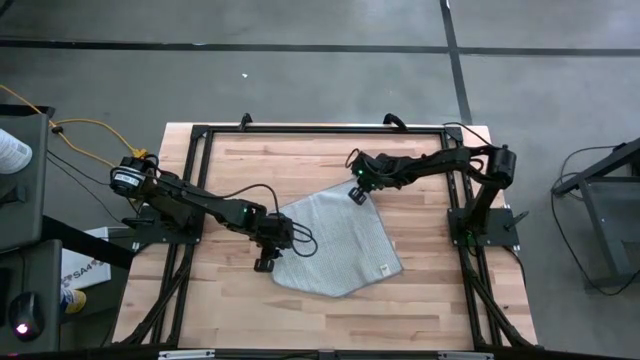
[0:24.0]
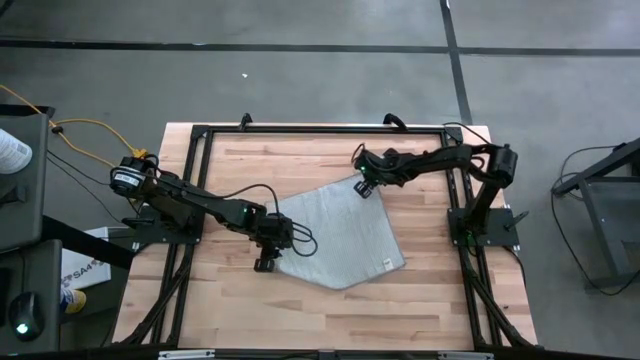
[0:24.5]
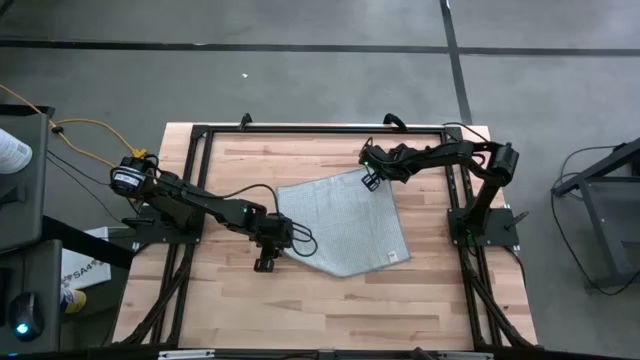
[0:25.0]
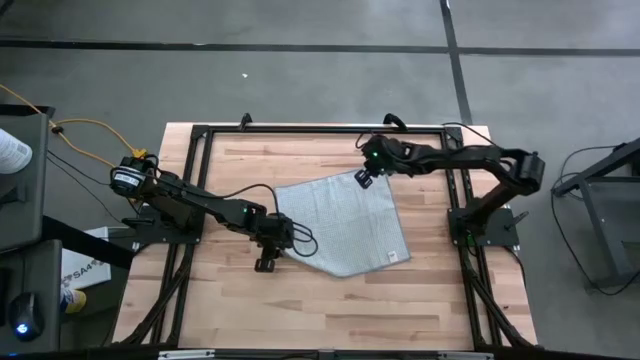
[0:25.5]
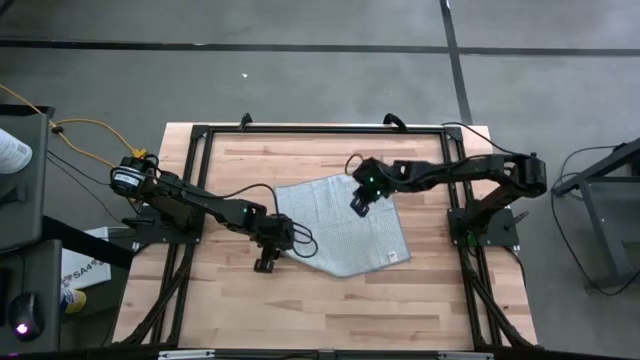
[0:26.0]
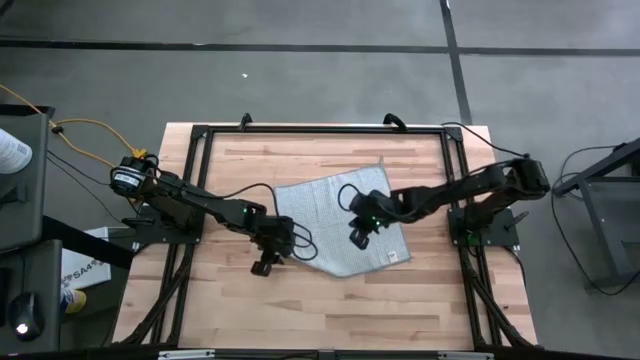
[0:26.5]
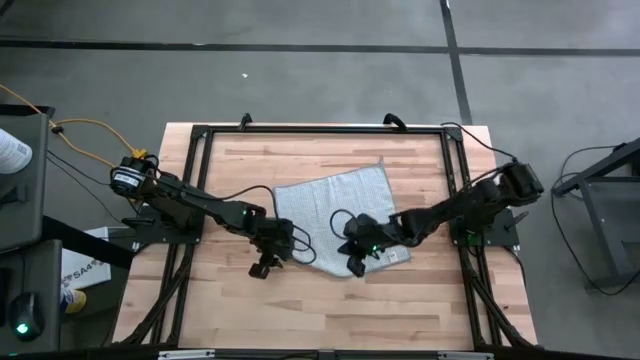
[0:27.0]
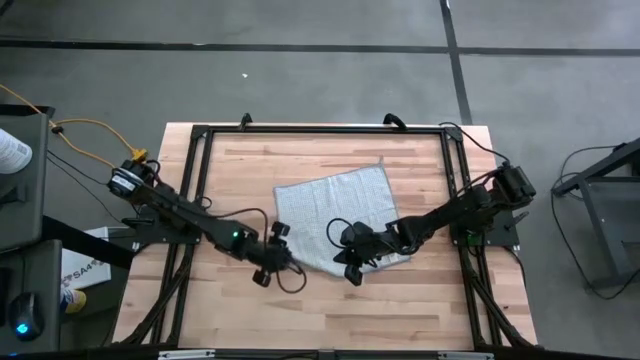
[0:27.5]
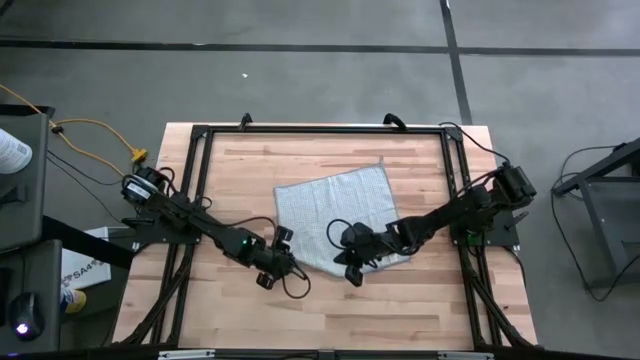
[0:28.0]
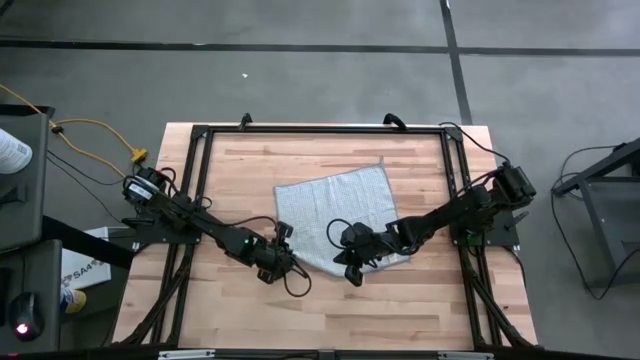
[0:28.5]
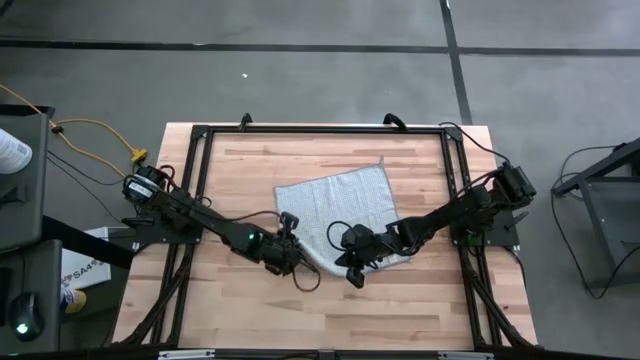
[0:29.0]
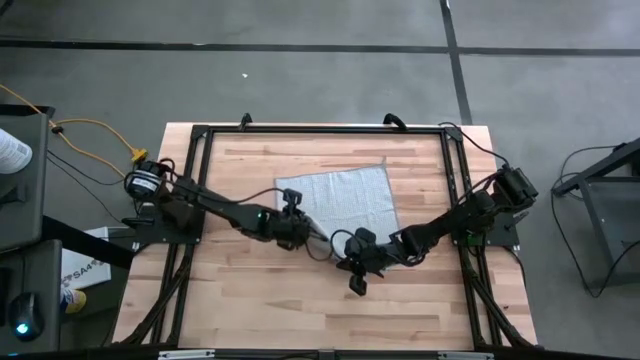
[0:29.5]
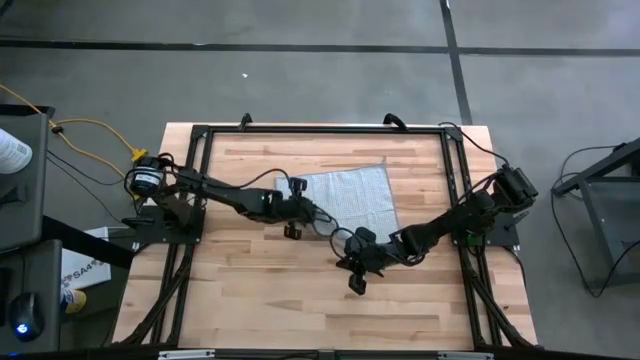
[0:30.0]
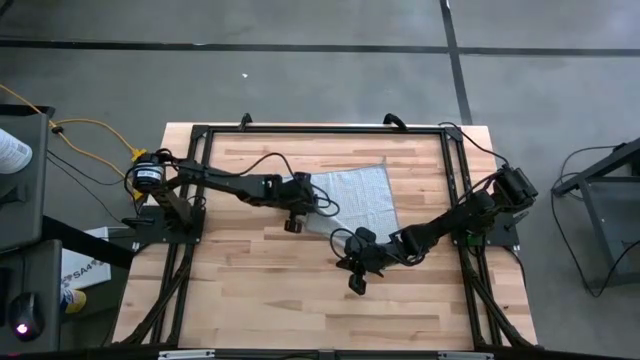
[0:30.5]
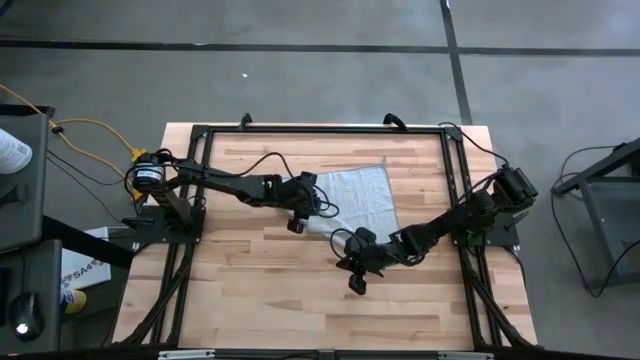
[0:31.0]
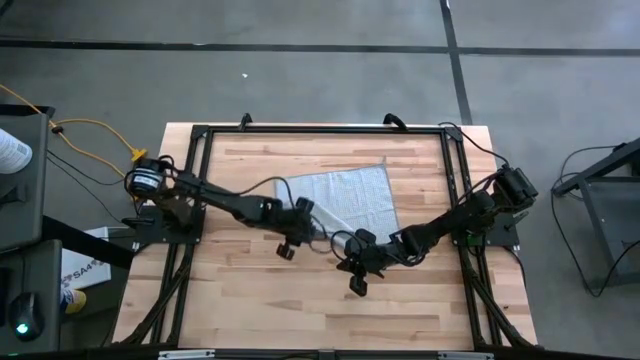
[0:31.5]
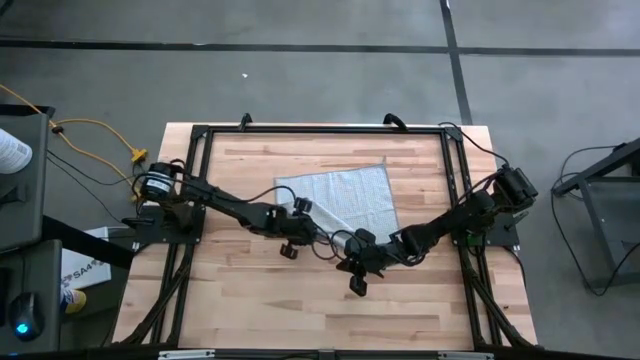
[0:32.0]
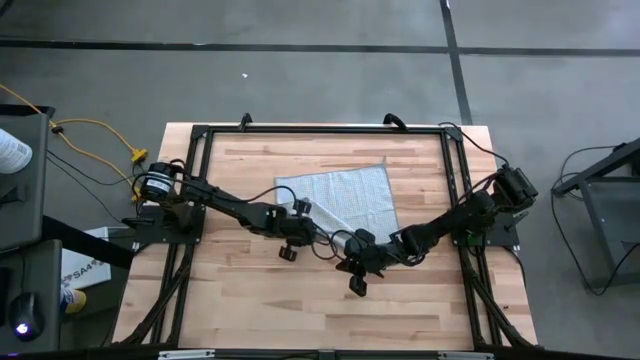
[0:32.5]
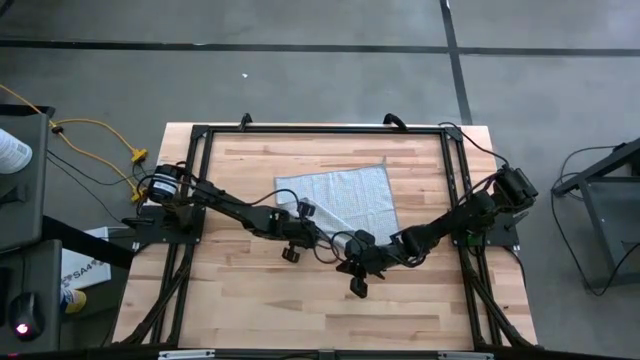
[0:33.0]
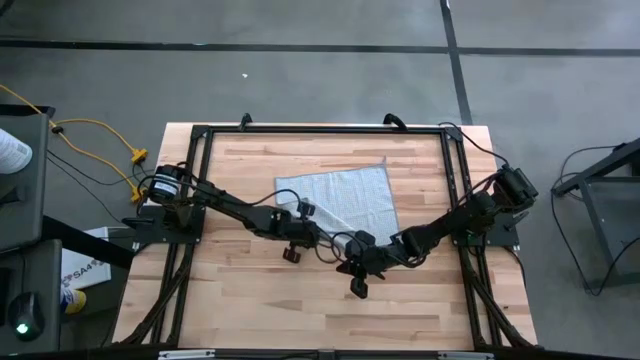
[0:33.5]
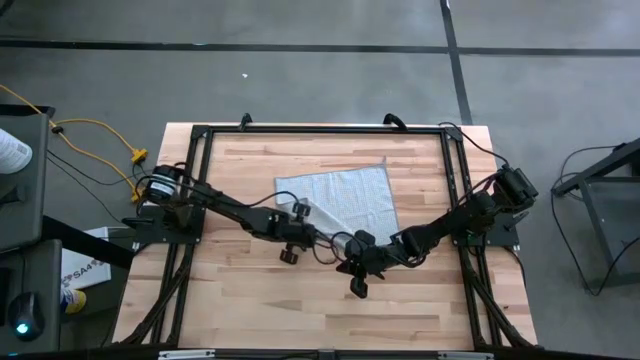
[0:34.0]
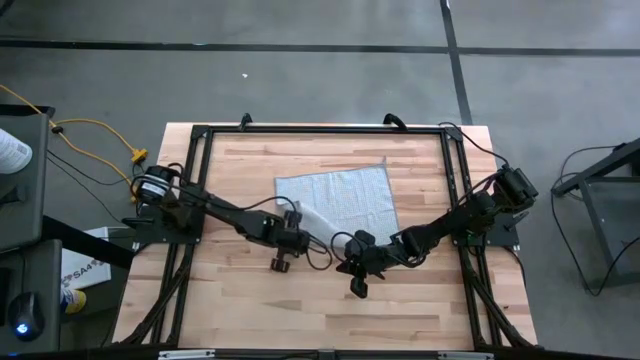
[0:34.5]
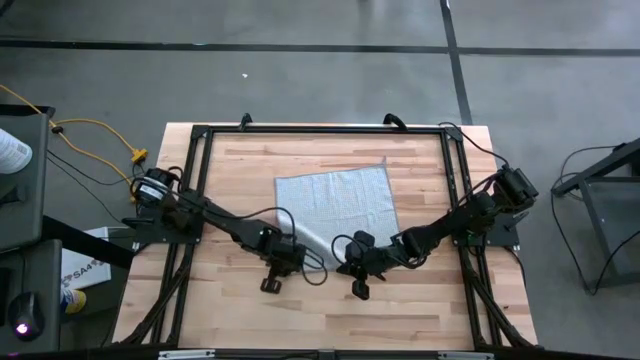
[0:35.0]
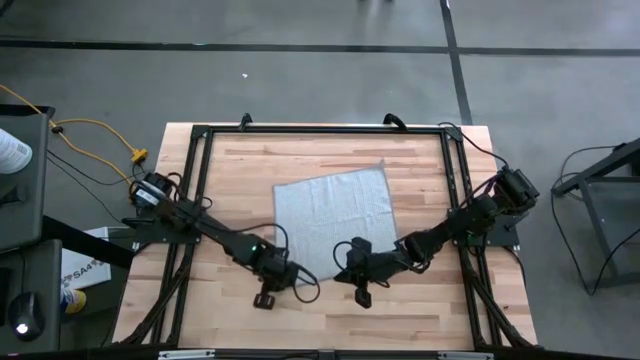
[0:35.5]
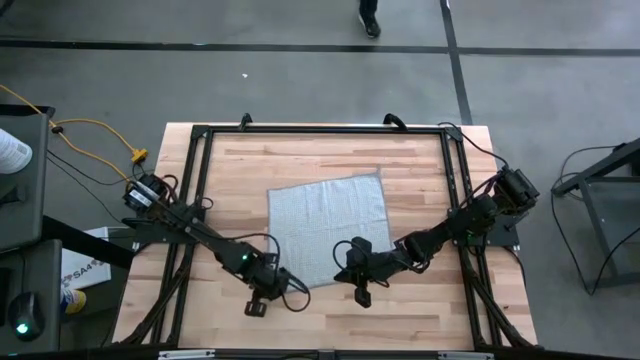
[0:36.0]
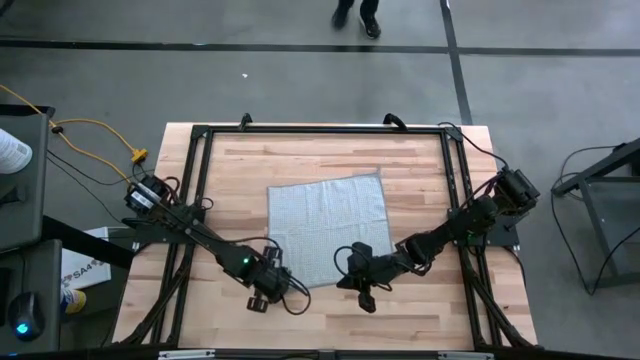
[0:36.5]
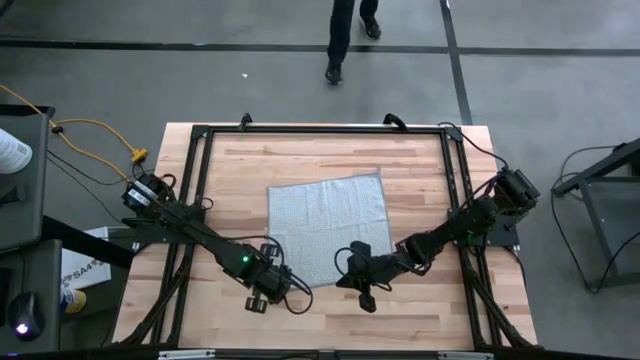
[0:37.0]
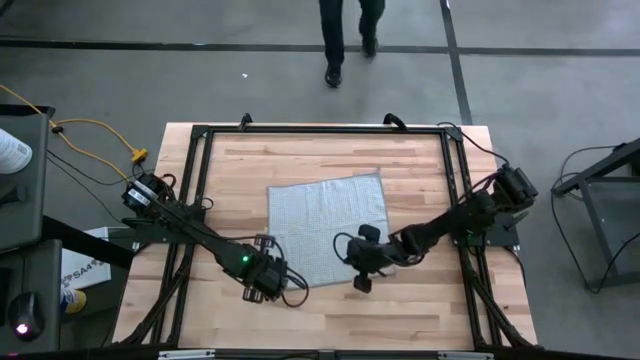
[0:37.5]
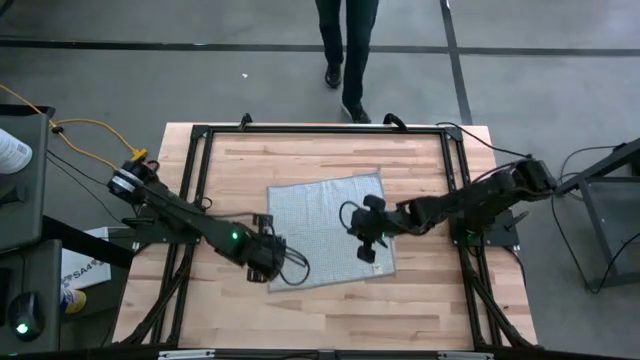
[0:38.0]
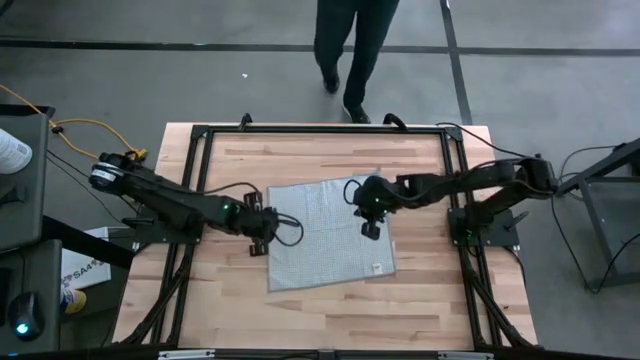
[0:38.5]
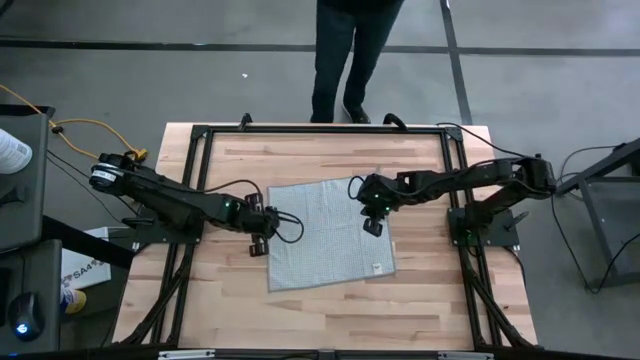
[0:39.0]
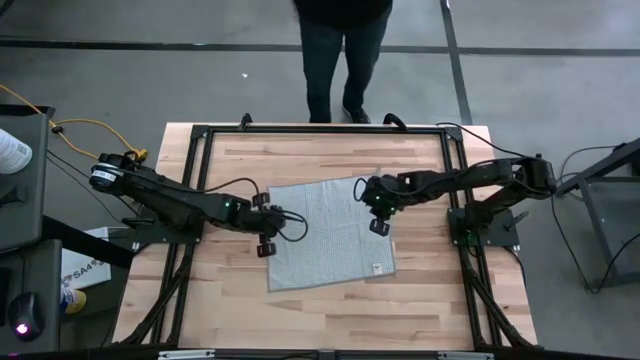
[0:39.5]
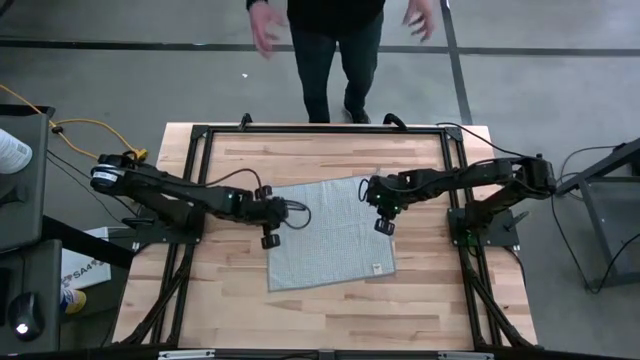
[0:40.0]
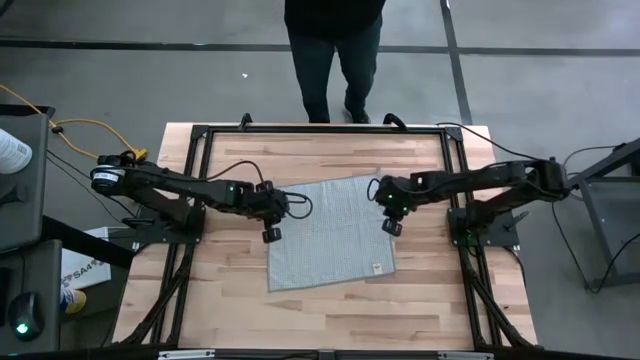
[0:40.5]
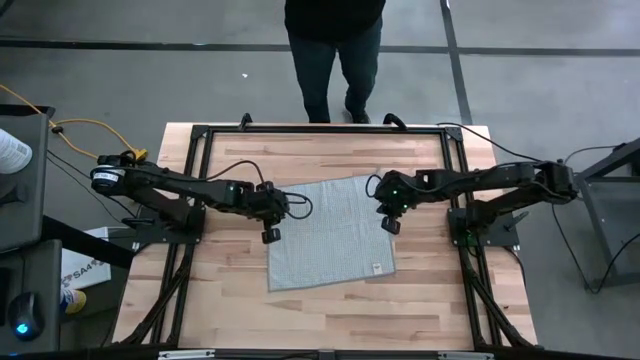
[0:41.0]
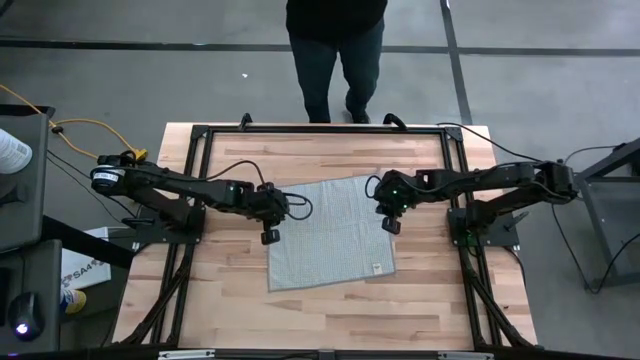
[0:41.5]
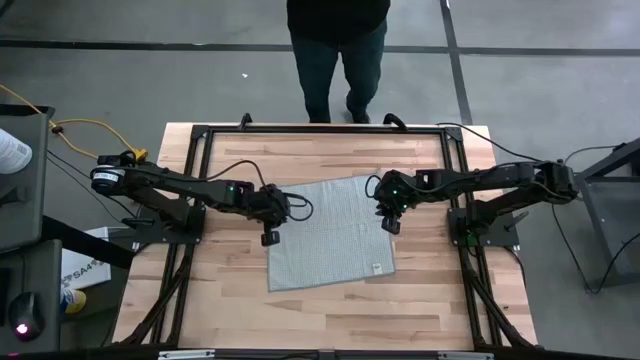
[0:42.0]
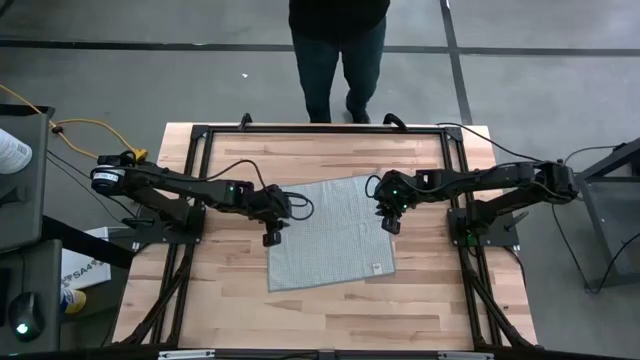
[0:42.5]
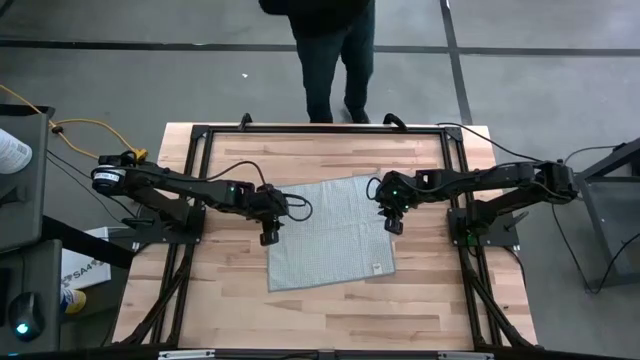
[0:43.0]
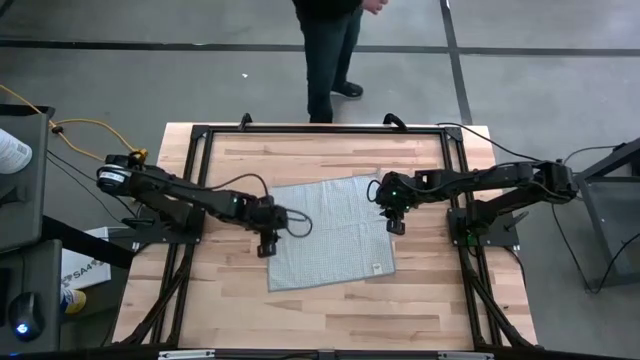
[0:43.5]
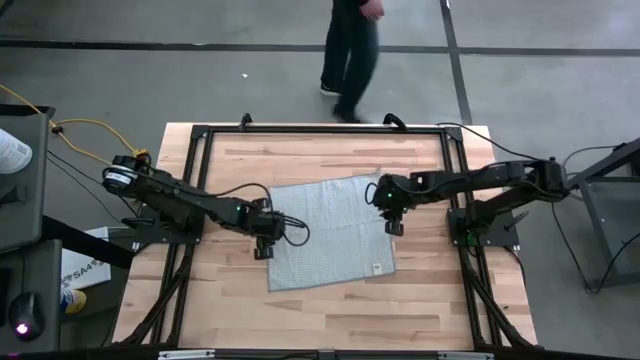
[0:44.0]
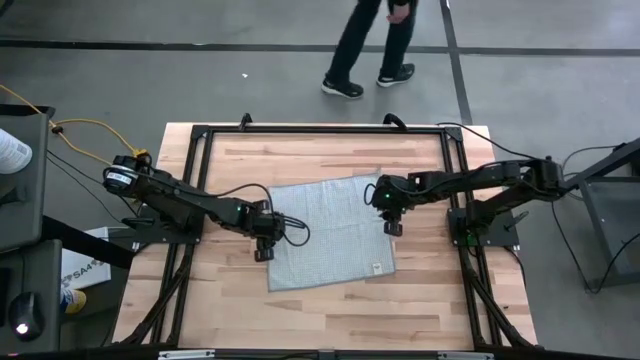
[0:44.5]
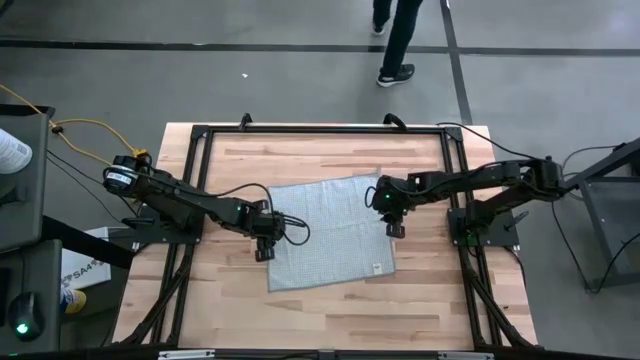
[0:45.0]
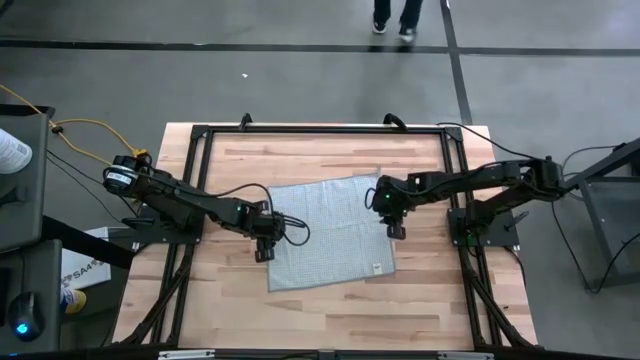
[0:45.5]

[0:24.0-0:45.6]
Task: Fold microfiber towels
Fold the gray towel
